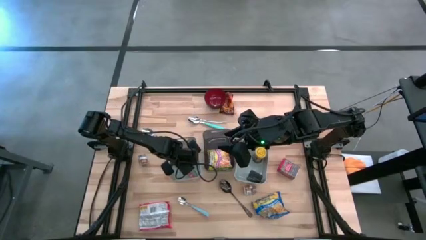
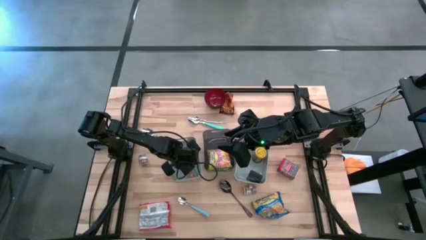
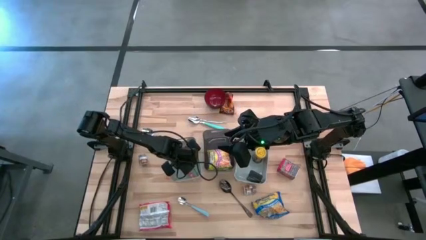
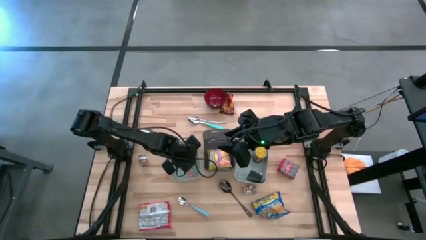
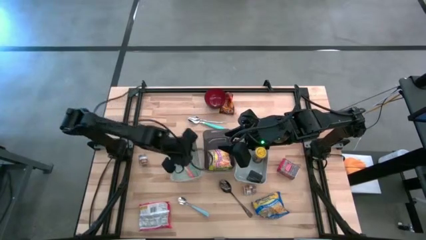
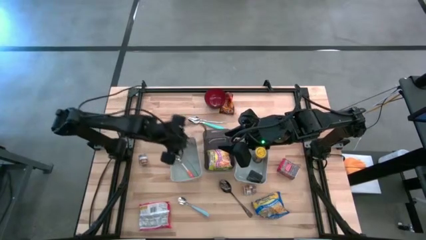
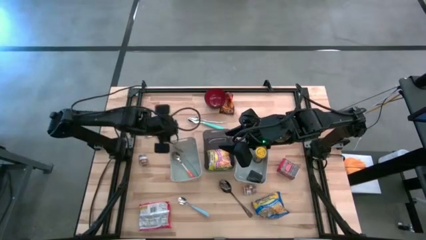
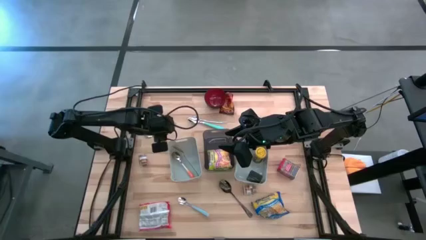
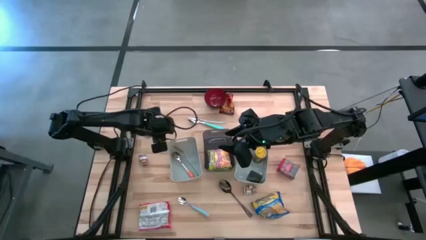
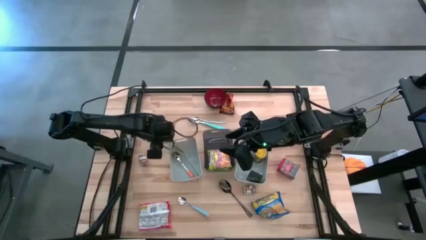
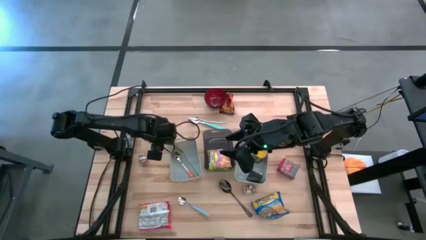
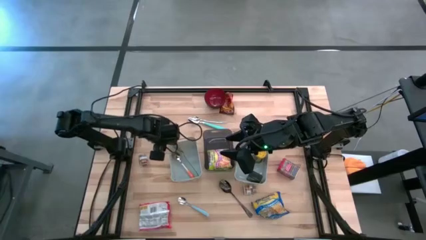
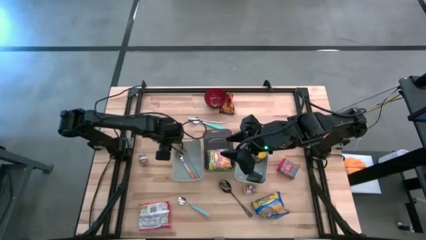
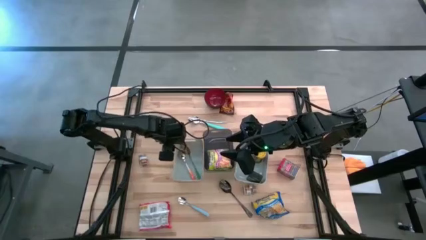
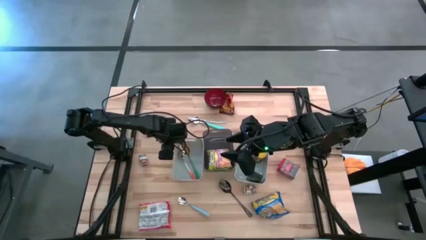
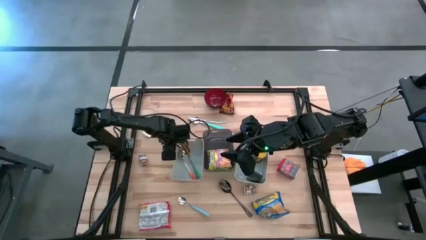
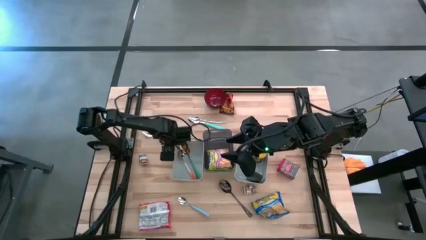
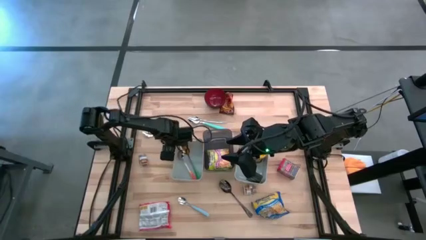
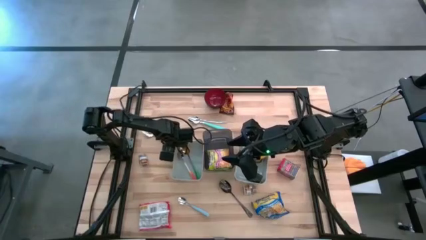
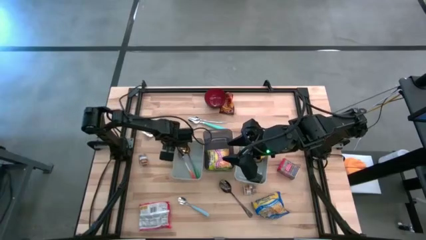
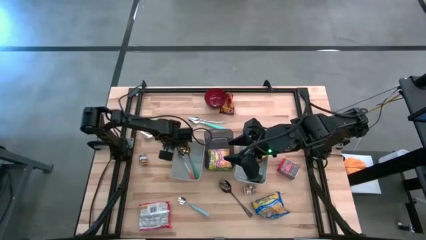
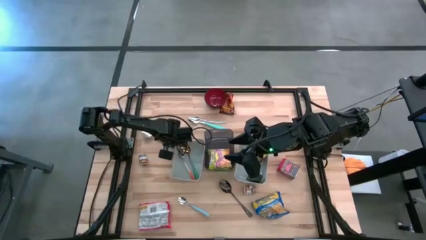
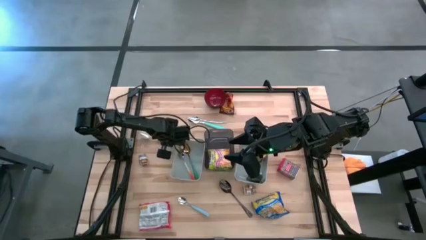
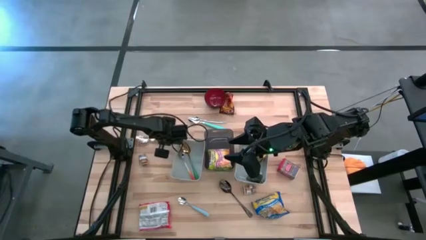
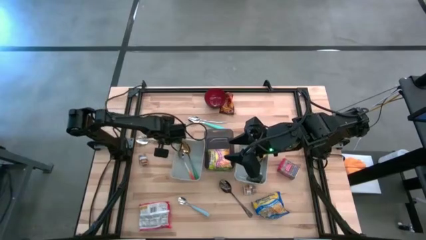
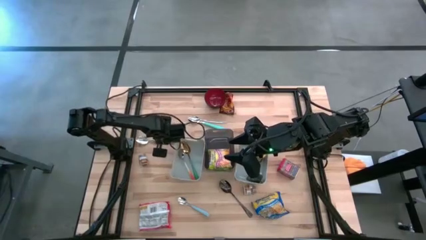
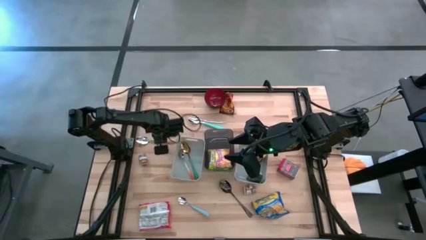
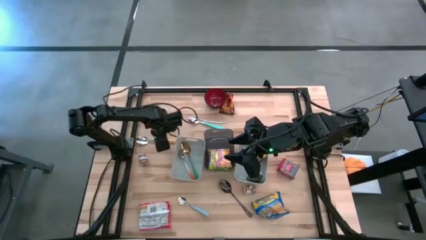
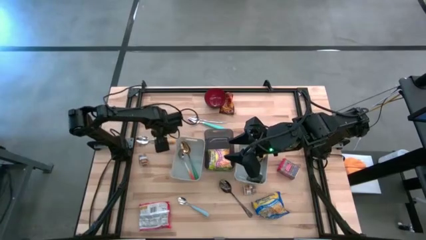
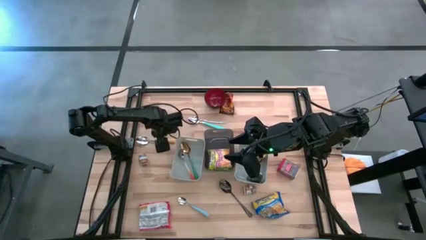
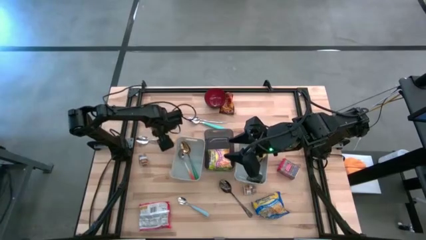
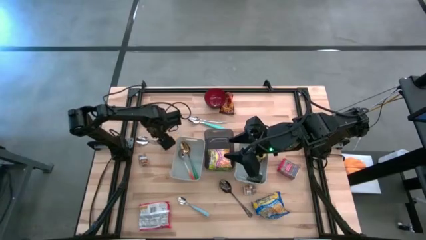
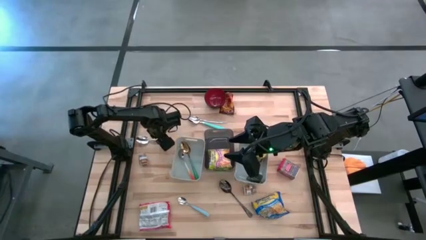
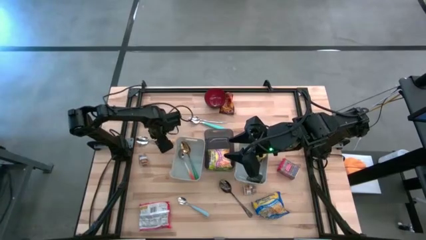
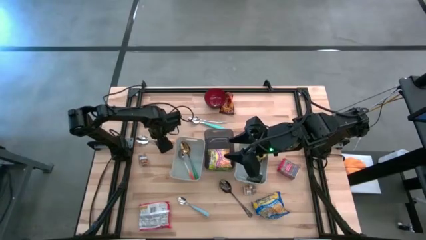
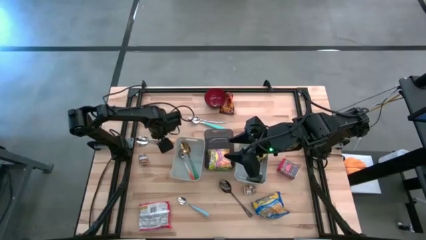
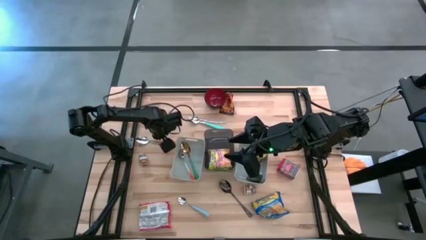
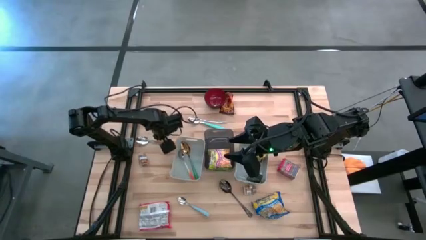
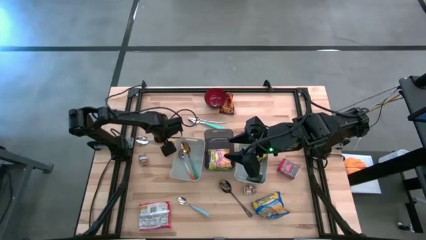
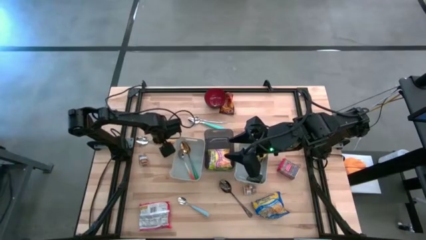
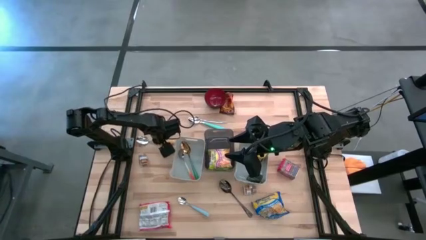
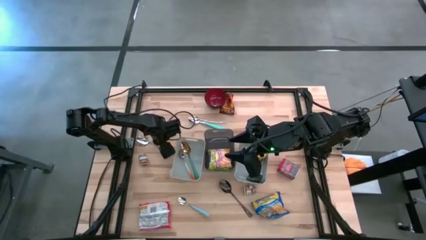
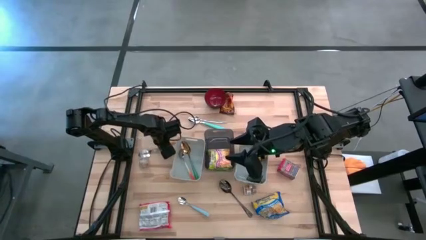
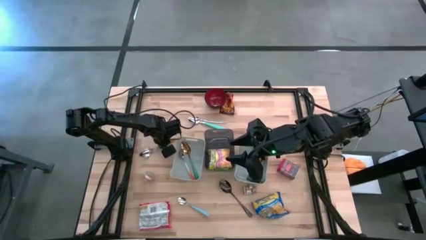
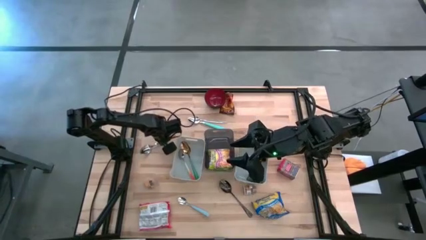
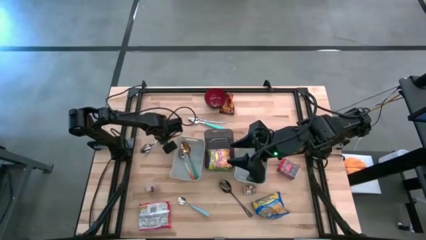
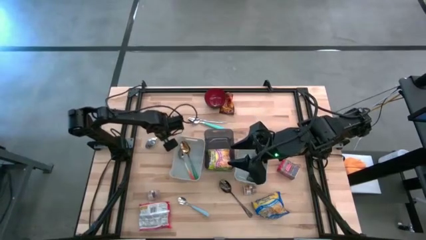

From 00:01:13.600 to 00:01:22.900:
Put the yellow spoon into the left gray bin

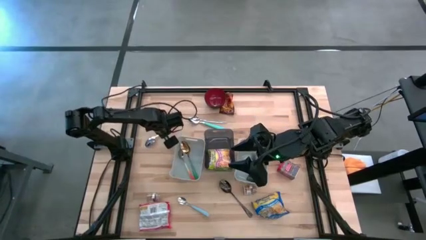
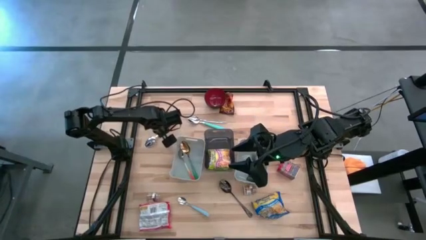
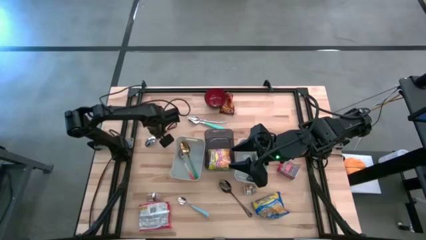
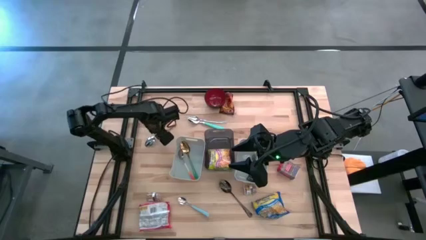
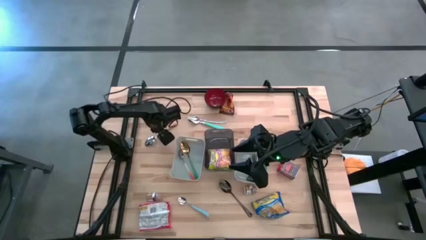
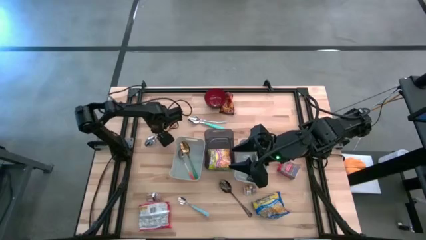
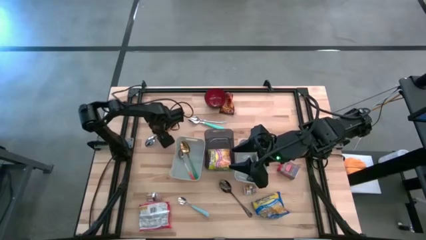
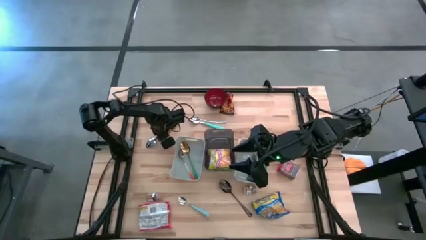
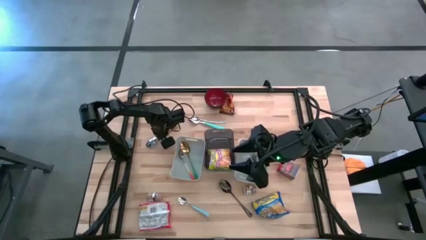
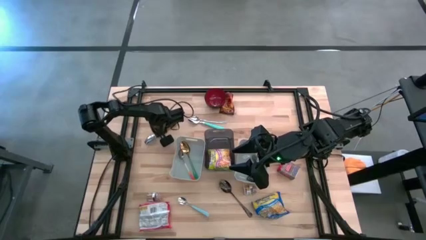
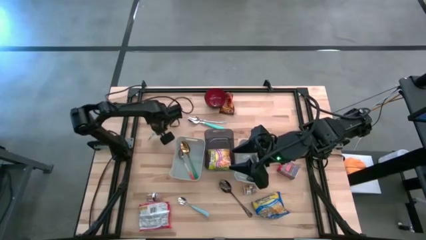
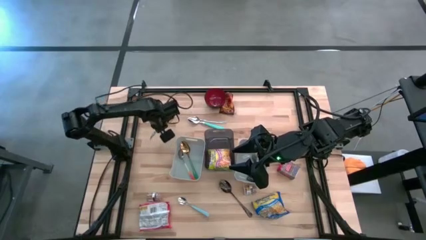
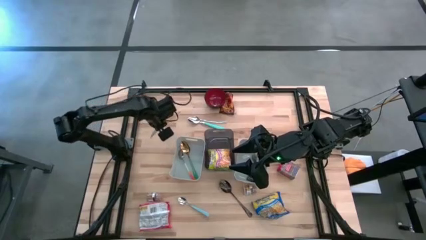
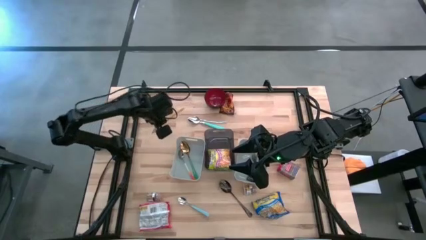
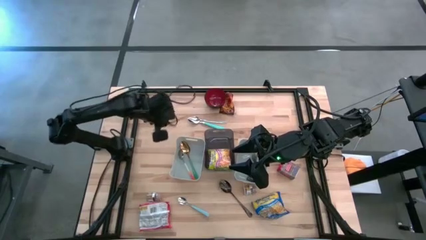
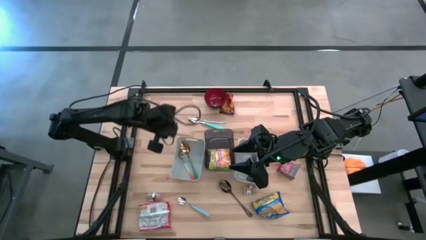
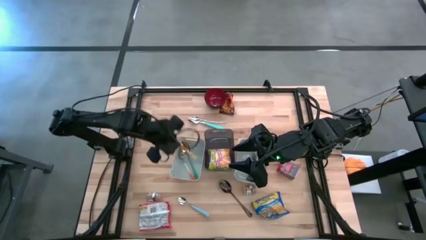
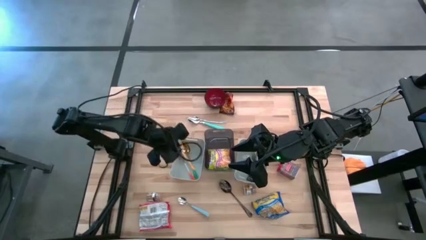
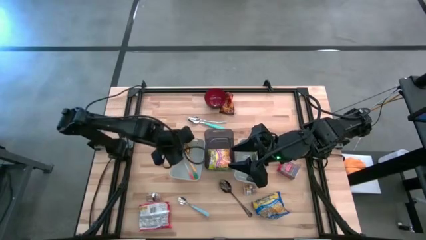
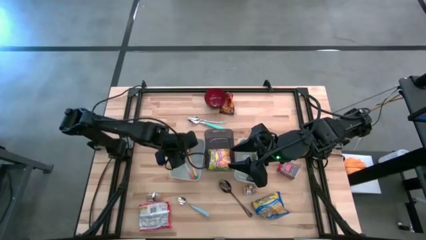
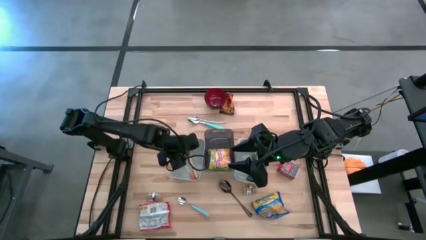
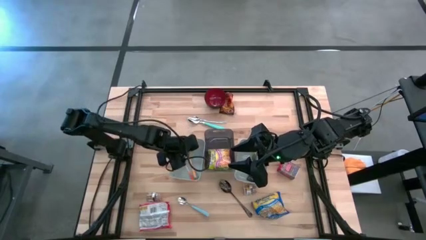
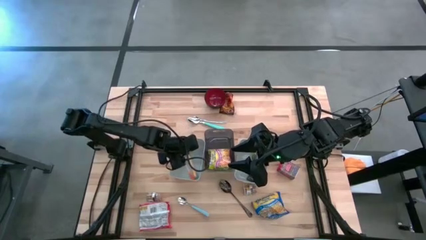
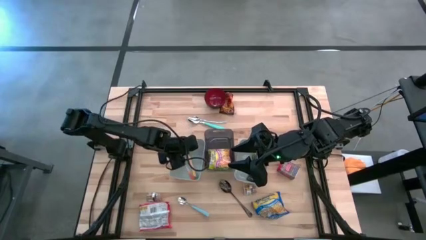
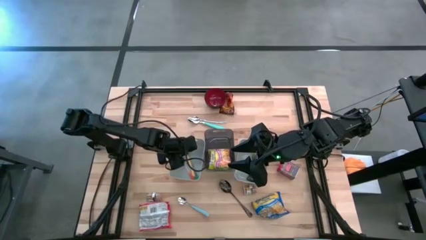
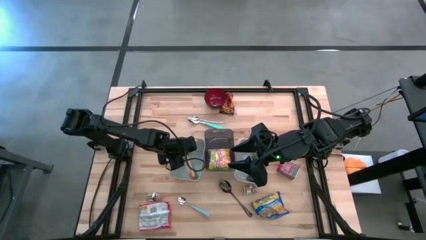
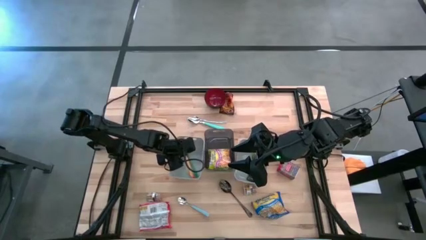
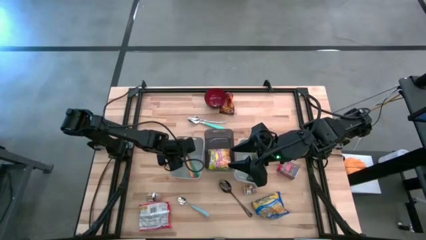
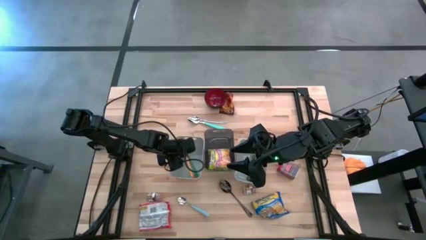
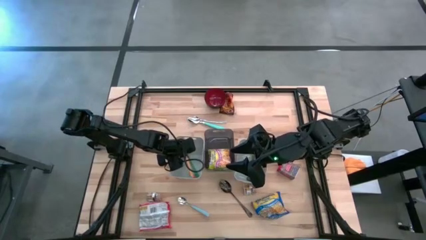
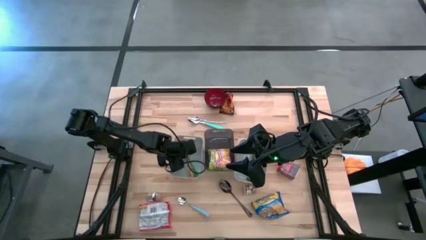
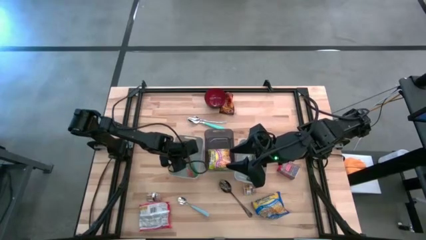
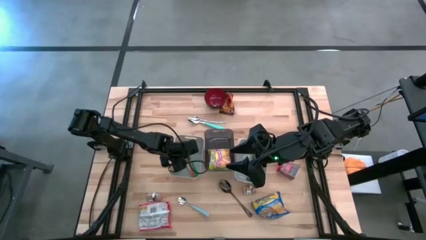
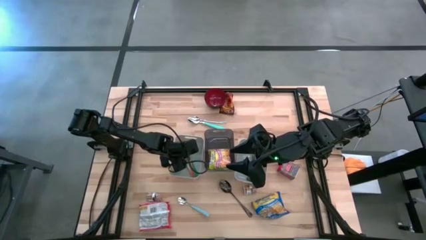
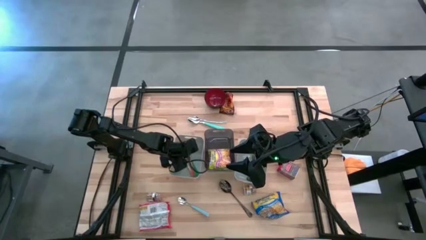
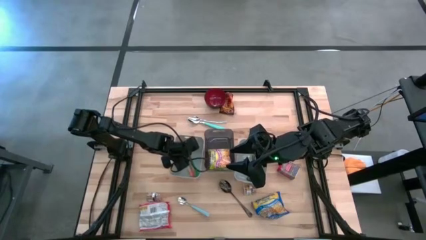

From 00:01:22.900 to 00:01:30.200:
Put the yellow spoon into the left gray bin
